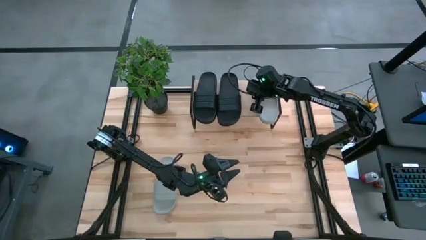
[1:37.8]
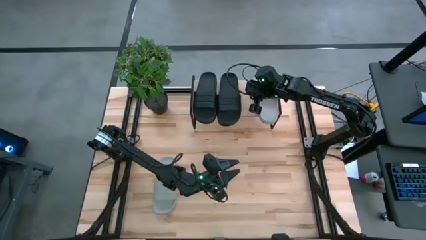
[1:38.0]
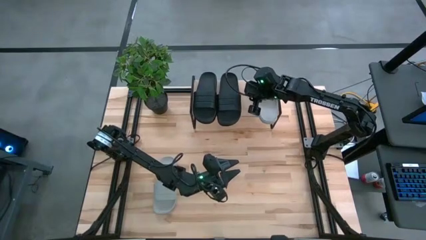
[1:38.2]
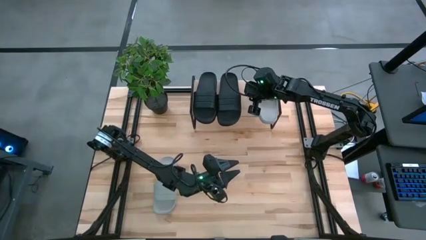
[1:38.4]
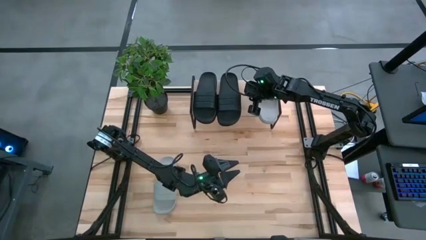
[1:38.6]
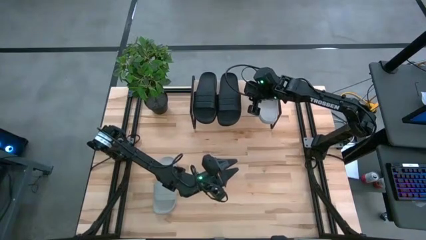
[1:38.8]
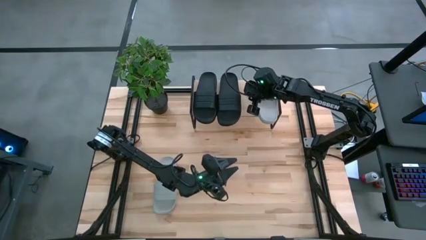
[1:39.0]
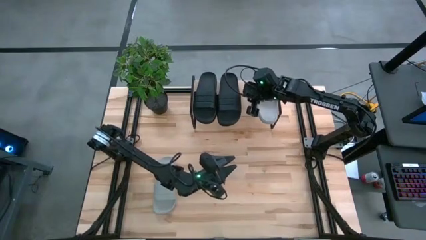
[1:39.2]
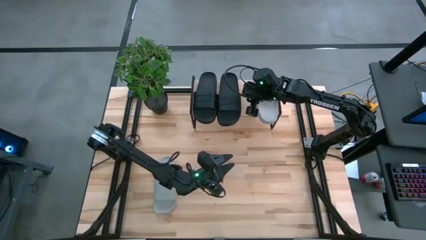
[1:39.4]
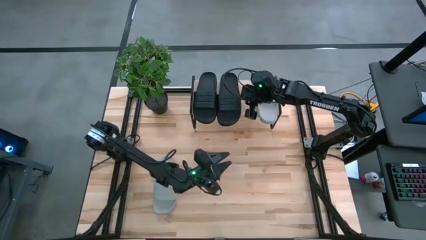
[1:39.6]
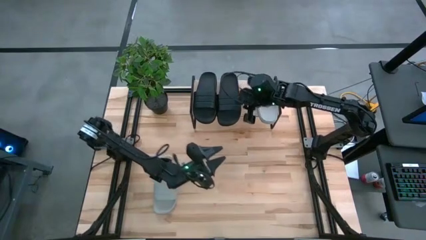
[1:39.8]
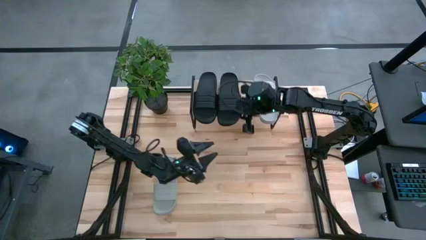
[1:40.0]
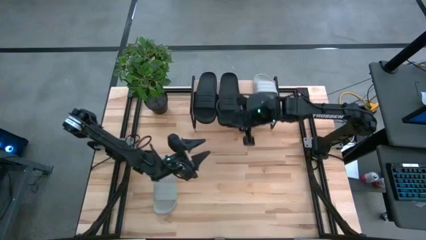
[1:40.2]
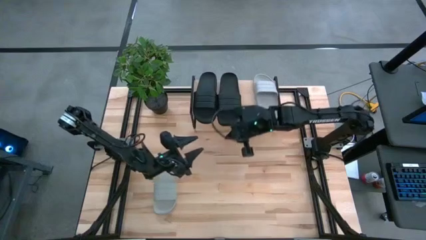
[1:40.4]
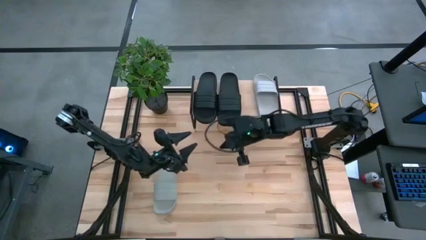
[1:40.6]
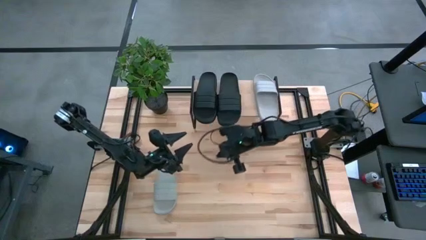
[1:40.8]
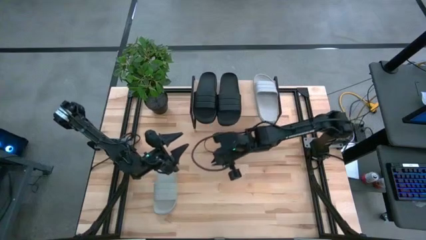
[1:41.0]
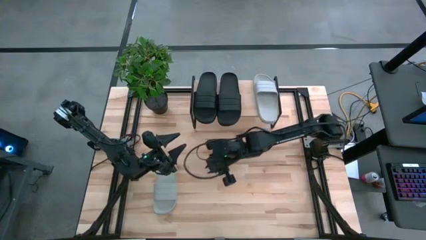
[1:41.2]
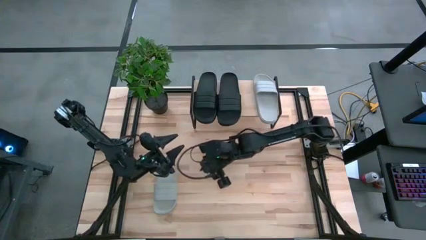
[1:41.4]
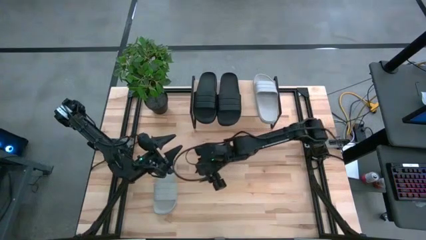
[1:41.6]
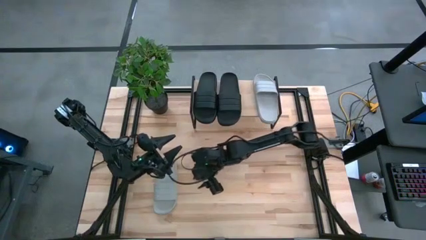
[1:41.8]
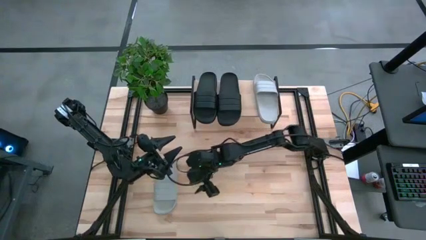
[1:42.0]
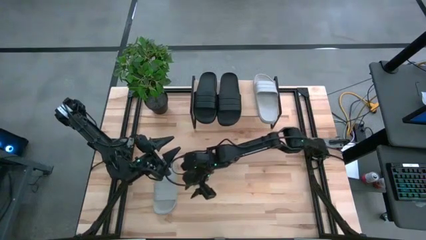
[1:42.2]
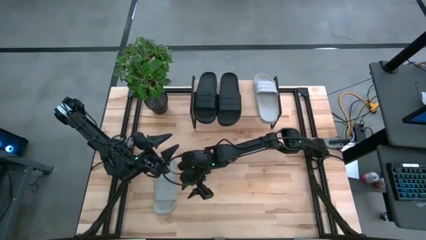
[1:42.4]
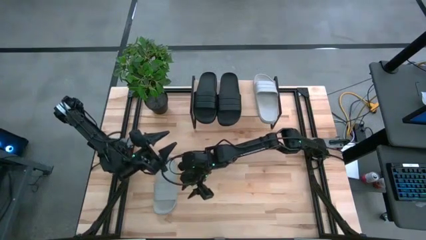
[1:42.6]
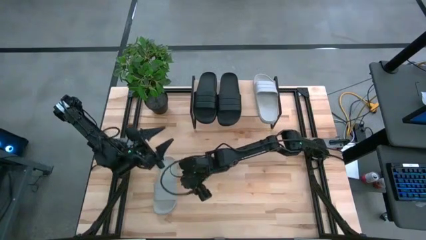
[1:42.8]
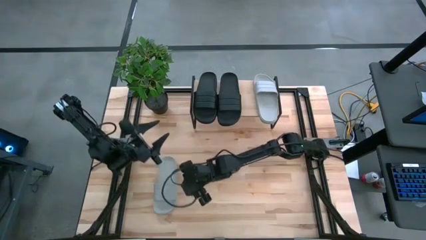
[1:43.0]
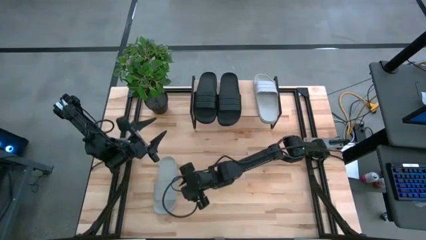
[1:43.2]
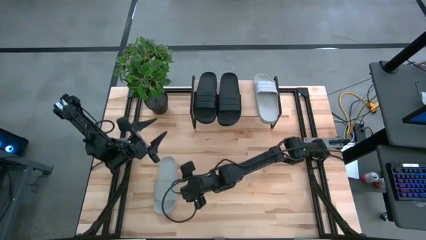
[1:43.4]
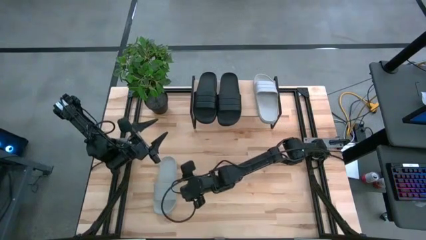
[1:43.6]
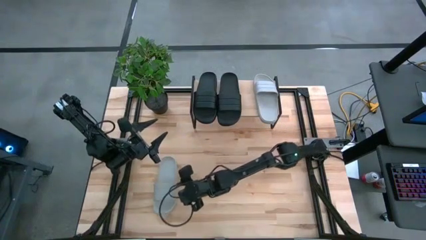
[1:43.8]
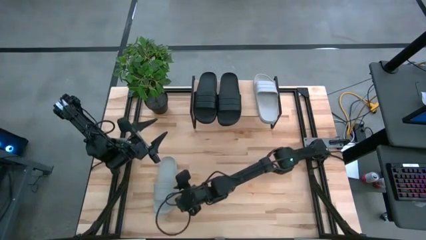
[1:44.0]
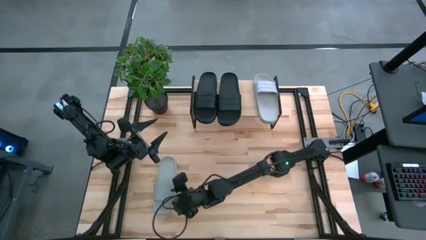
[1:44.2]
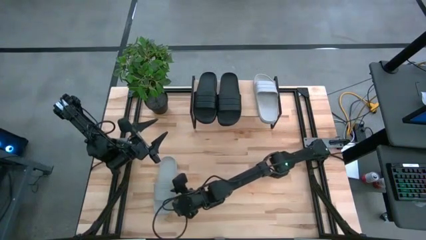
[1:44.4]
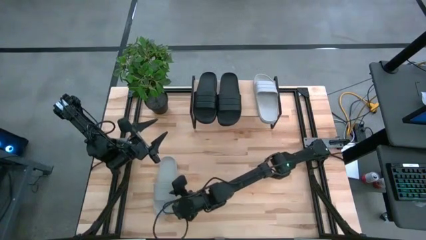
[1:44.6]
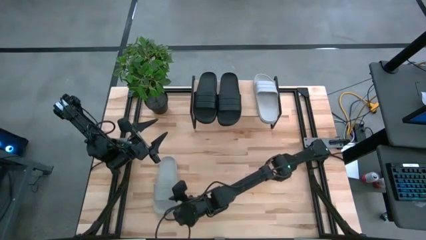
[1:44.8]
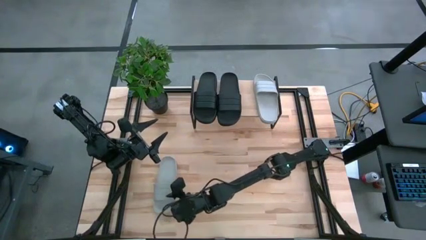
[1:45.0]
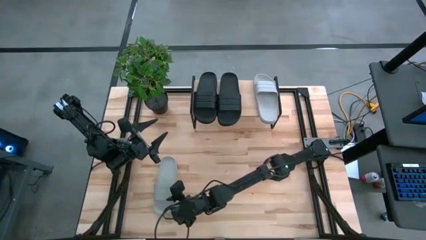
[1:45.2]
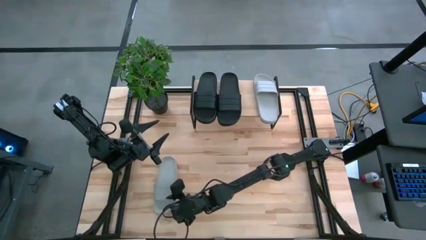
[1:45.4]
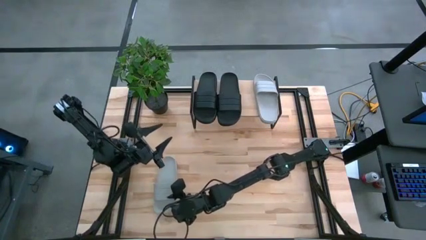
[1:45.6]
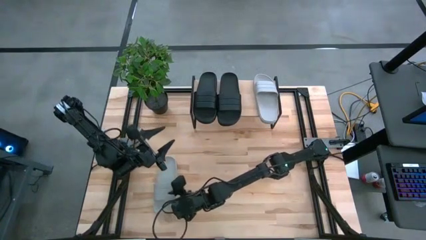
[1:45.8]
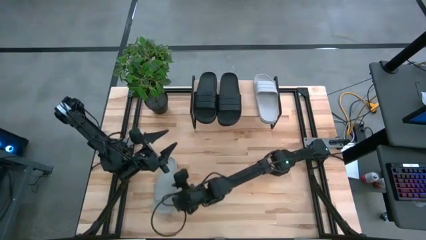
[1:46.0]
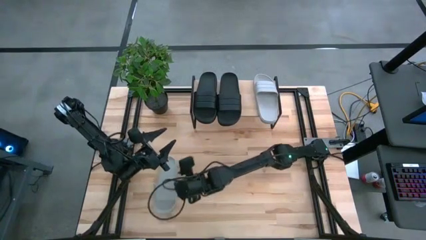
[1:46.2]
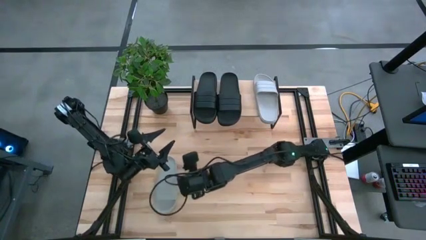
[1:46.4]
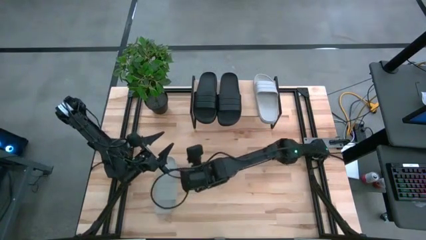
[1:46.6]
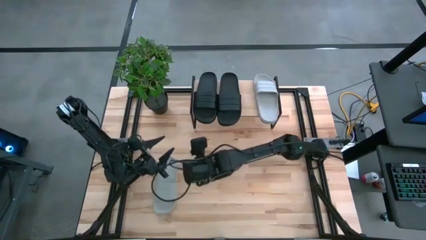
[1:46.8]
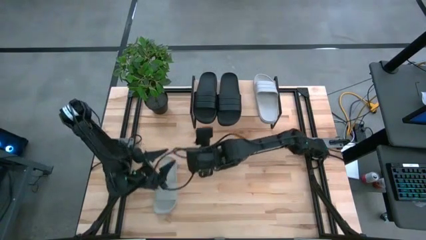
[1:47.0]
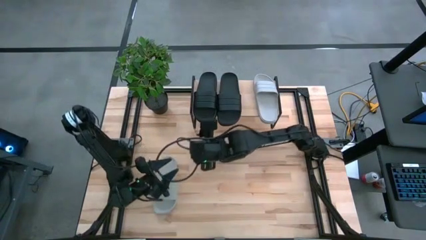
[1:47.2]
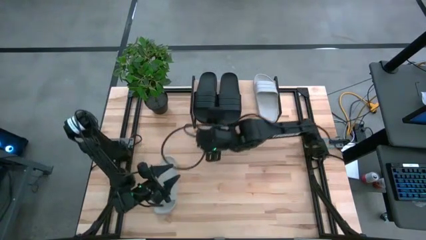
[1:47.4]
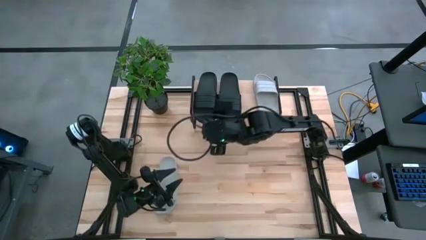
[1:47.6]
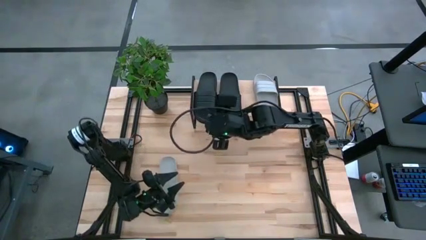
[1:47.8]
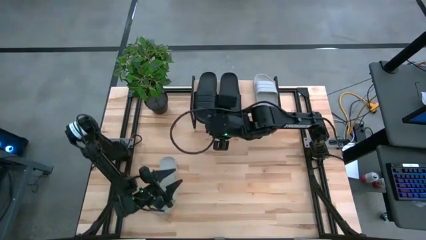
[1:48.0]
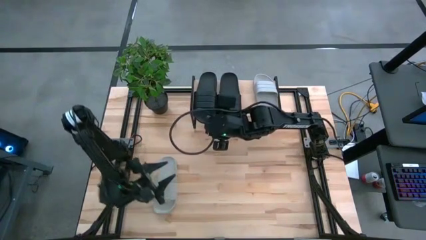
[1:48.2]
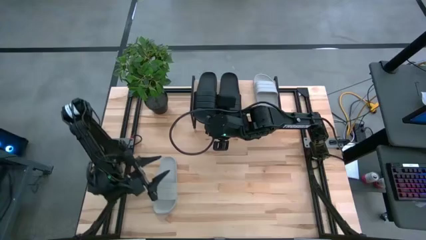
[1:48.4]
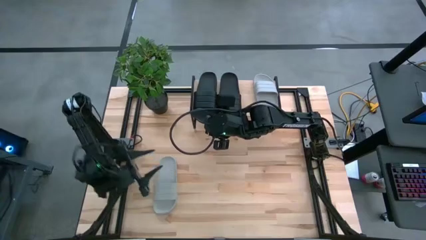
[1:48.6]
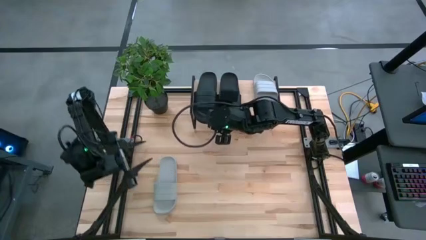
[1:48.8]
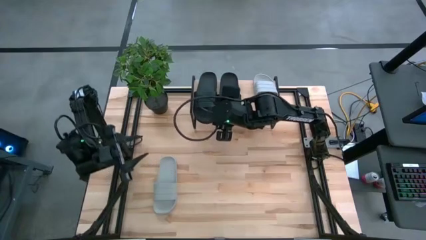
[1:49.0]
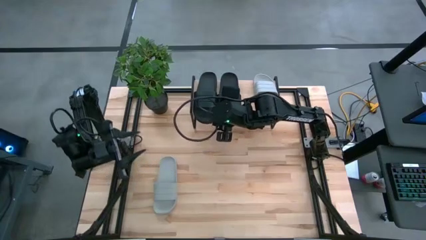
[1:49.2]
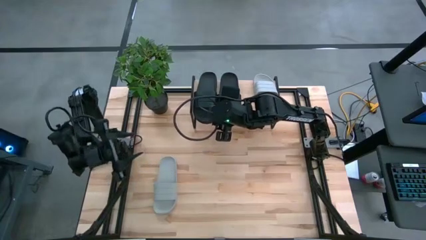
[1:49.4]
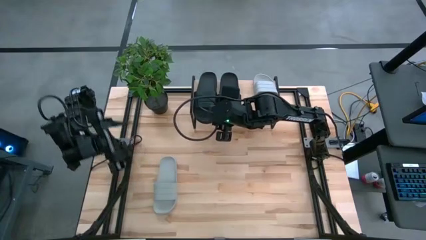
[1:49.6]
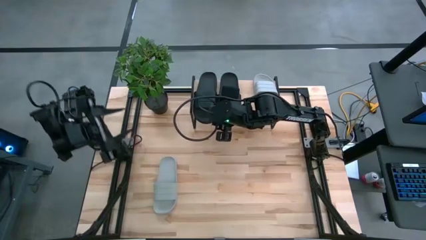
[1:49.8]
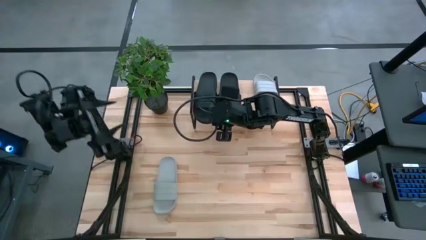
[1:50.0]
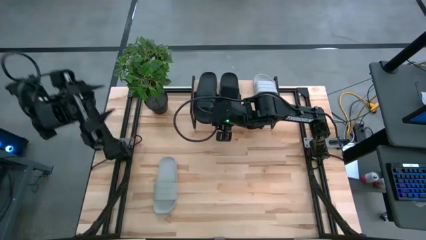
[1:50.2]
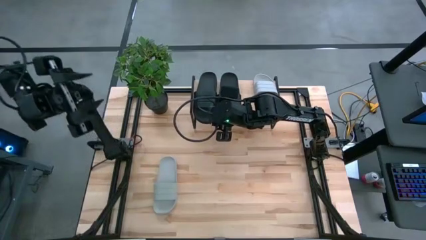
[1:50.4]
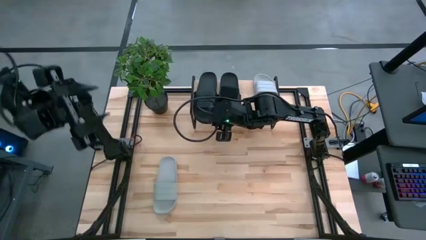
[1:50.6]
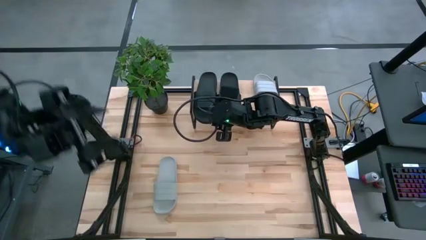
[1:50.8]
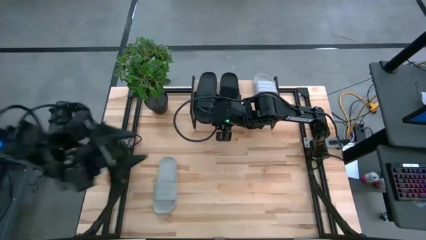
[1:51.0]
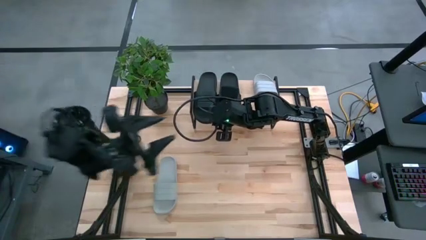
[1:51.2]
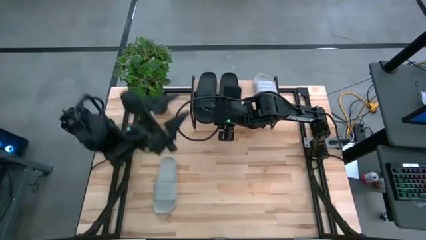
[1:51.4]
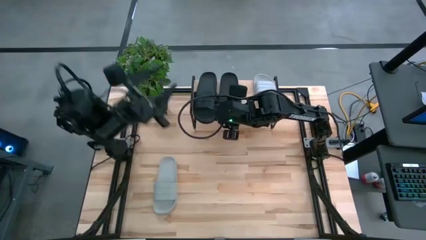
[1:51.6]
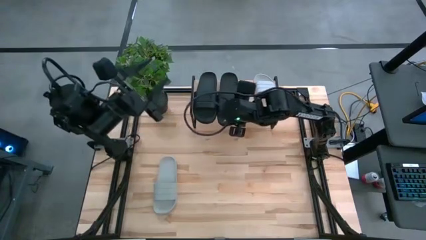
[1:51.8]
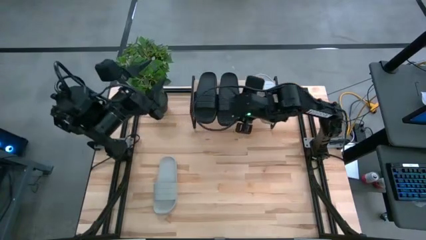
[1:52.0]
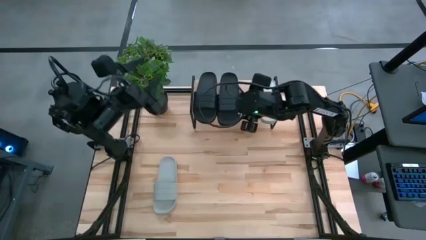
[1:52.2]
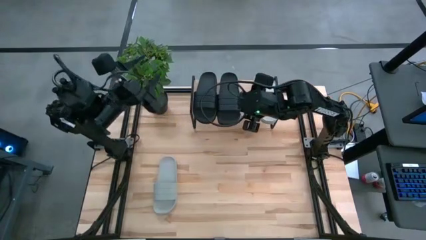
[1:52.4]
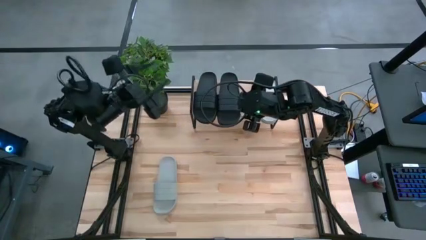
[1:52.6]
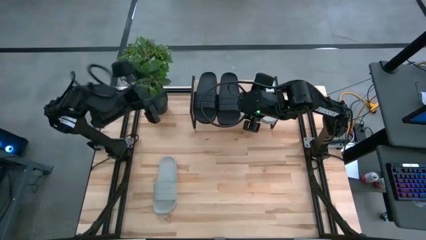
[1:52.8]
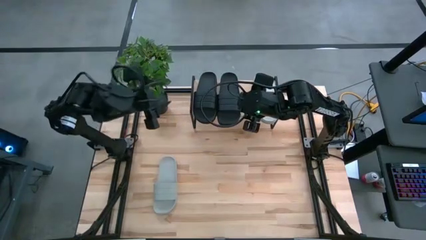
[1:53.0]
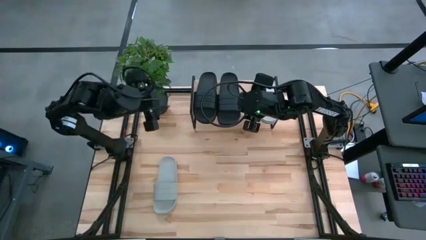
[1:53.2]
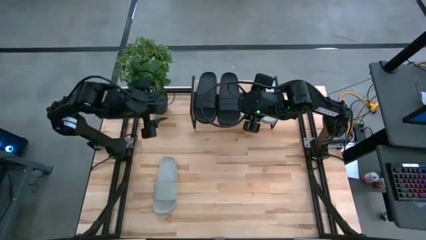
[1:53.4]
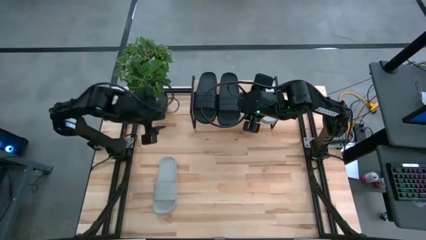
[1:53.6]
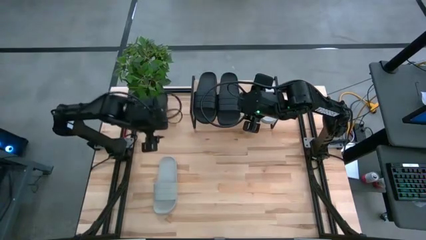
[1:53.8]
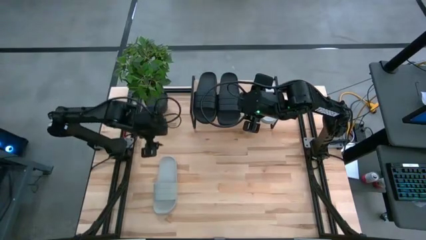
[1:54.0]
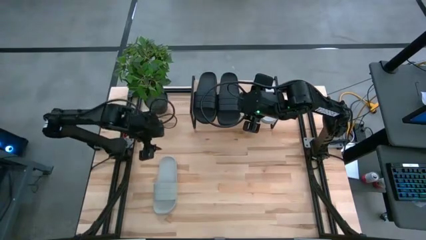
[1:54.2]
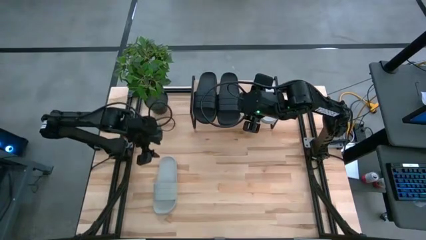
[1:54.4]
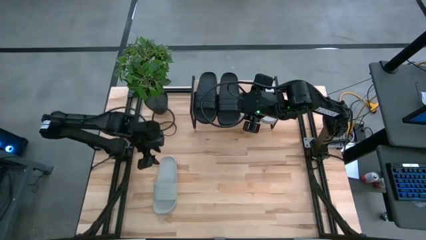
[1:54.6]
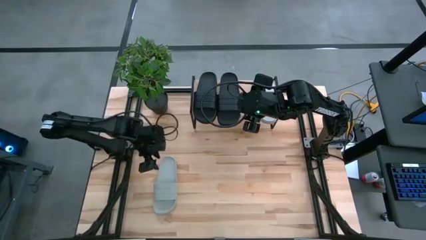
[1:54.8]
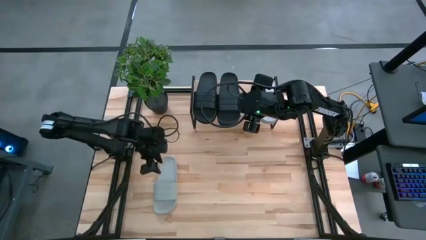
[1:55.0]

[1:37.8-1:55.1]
Task: Pick and place slides into the shelf
Put the gray slide on the shelf
